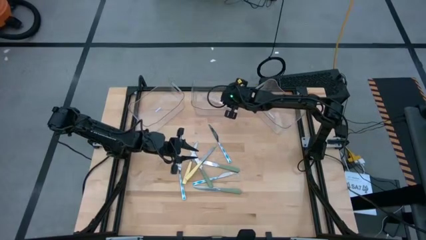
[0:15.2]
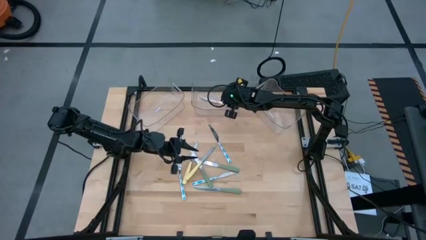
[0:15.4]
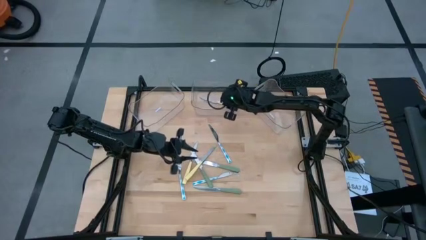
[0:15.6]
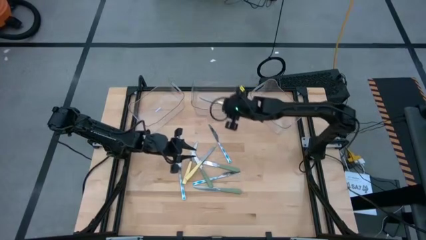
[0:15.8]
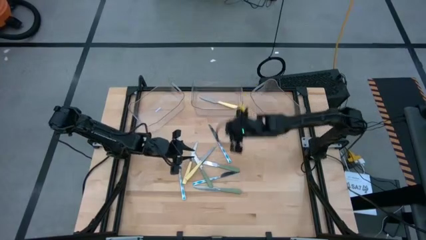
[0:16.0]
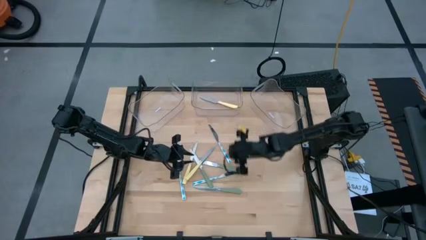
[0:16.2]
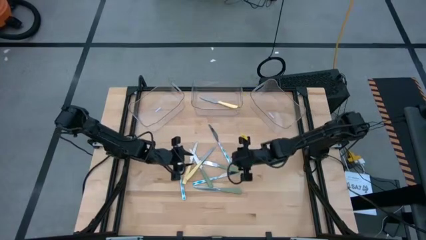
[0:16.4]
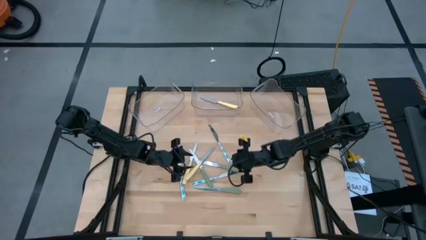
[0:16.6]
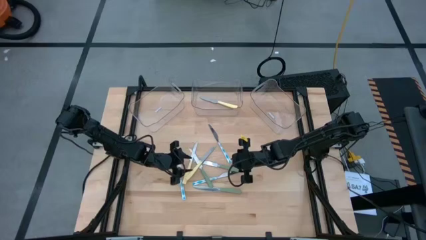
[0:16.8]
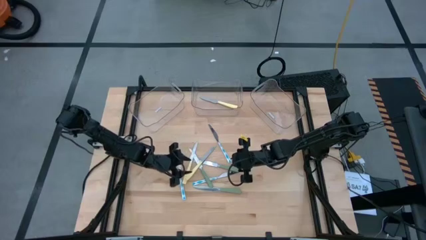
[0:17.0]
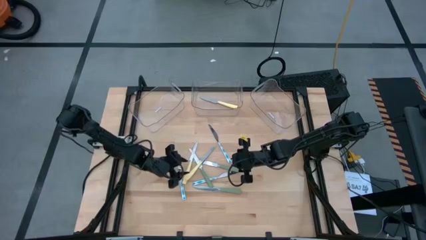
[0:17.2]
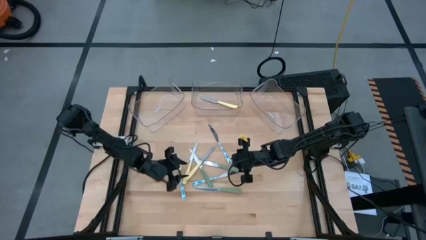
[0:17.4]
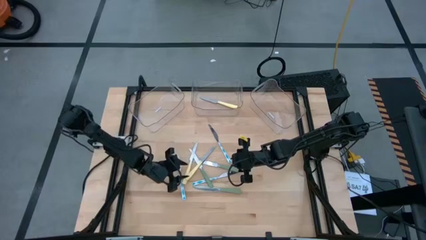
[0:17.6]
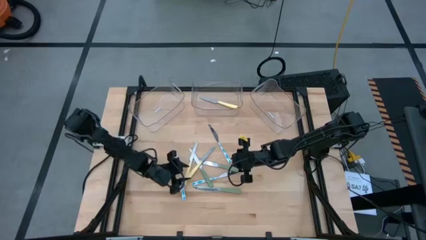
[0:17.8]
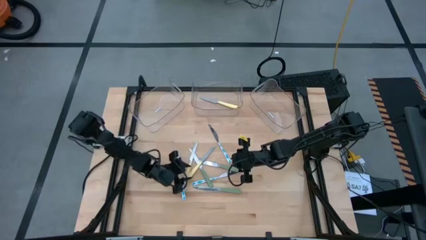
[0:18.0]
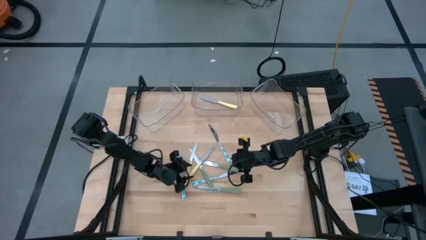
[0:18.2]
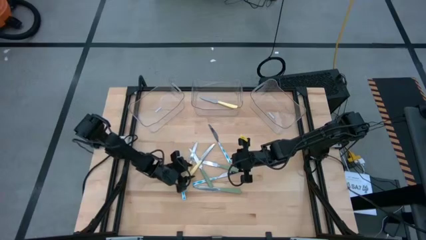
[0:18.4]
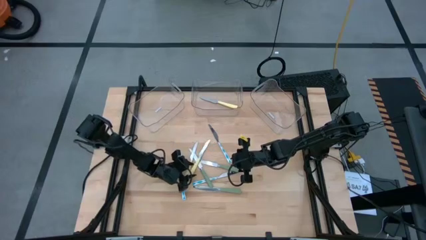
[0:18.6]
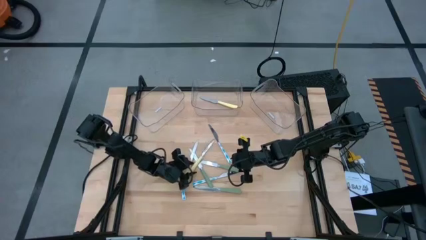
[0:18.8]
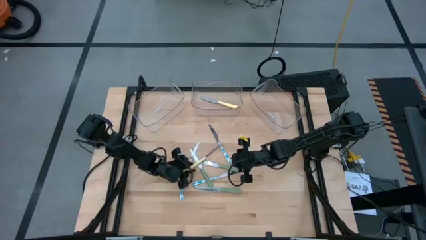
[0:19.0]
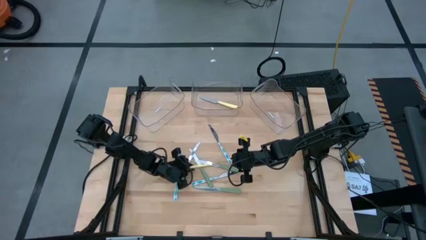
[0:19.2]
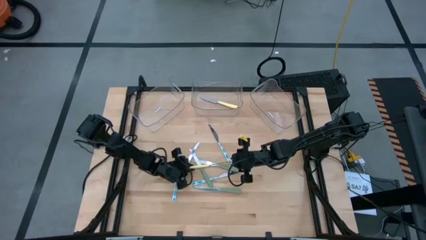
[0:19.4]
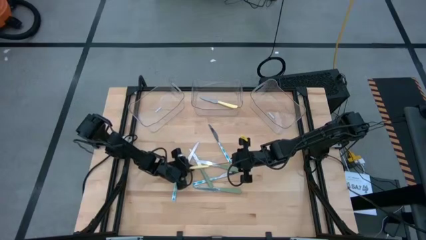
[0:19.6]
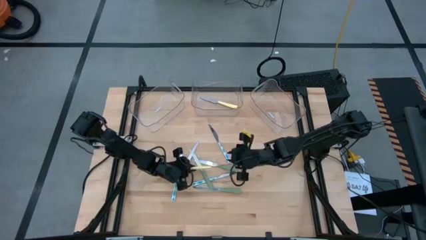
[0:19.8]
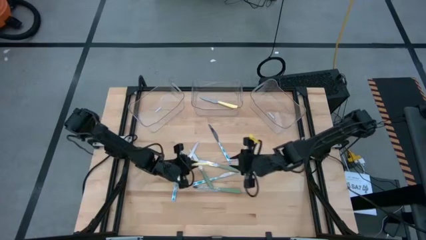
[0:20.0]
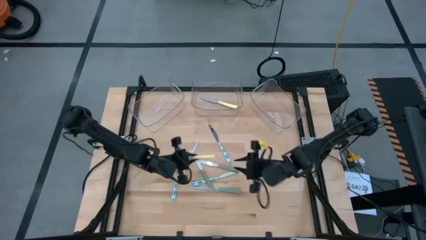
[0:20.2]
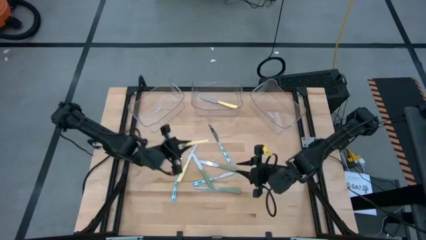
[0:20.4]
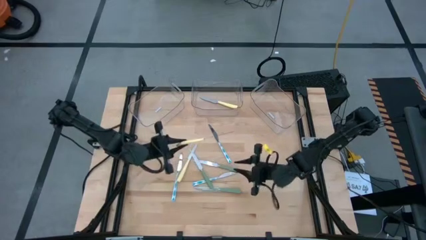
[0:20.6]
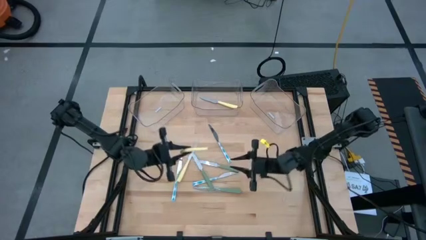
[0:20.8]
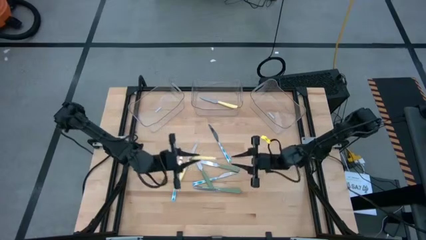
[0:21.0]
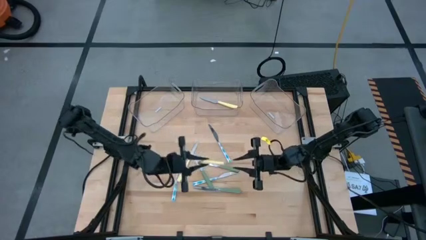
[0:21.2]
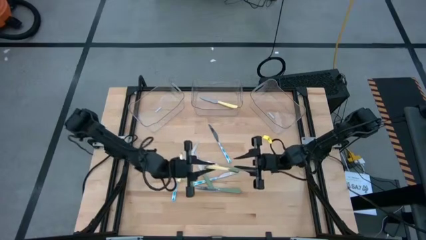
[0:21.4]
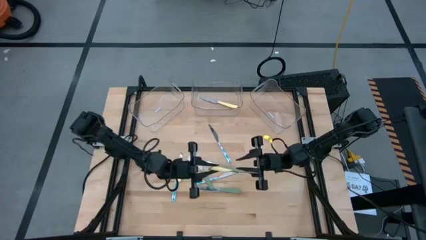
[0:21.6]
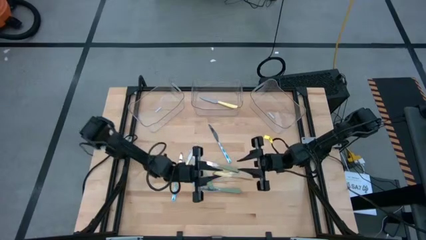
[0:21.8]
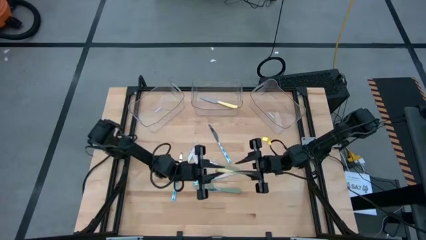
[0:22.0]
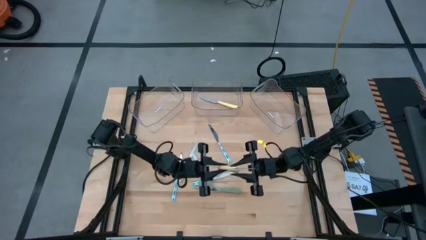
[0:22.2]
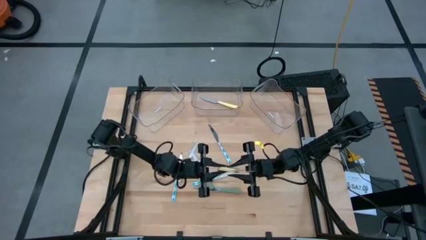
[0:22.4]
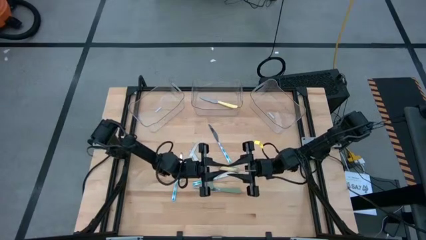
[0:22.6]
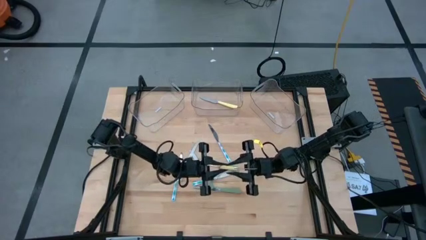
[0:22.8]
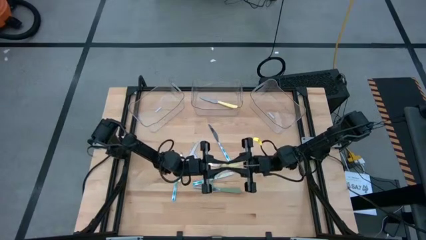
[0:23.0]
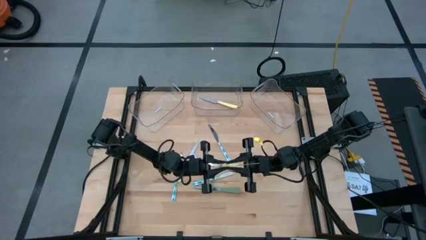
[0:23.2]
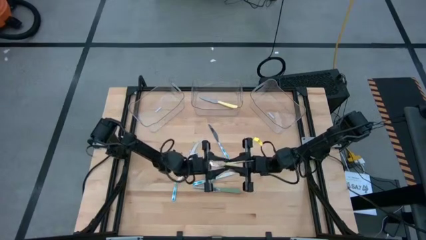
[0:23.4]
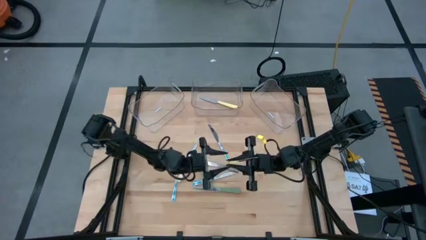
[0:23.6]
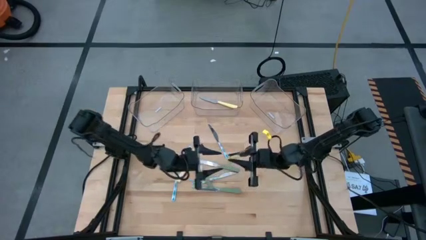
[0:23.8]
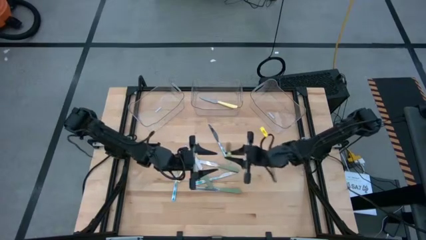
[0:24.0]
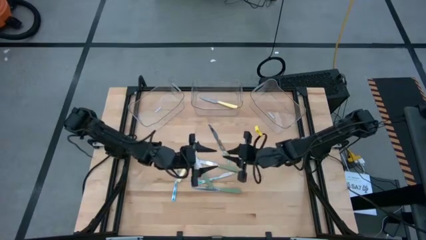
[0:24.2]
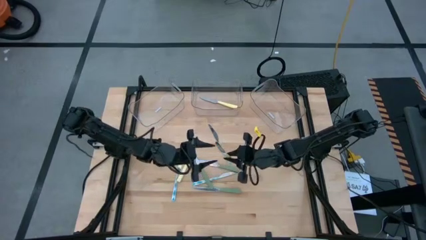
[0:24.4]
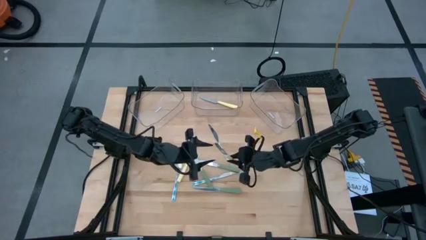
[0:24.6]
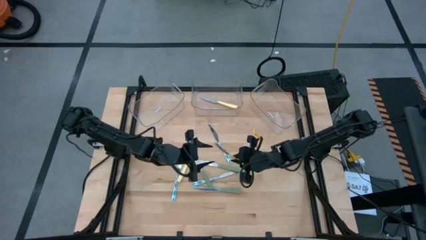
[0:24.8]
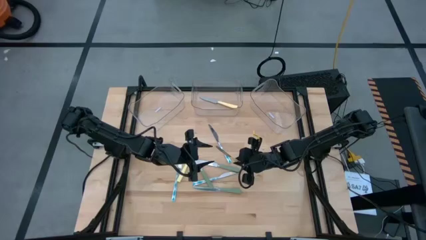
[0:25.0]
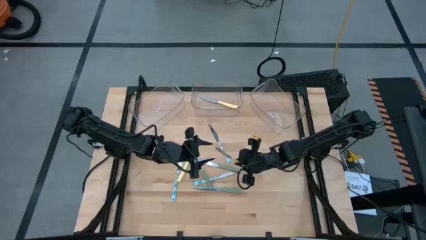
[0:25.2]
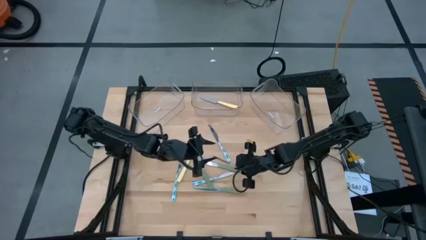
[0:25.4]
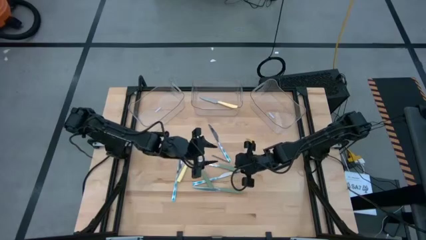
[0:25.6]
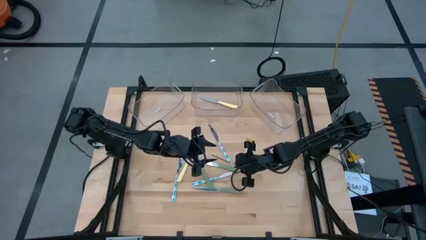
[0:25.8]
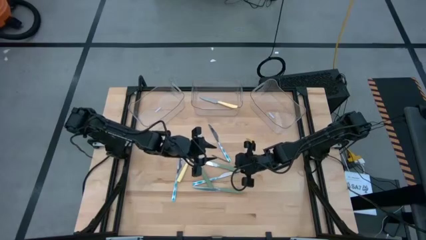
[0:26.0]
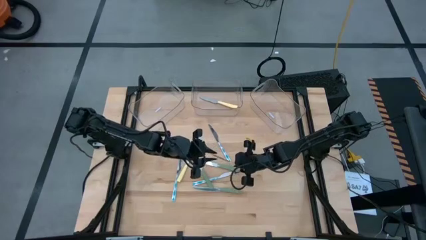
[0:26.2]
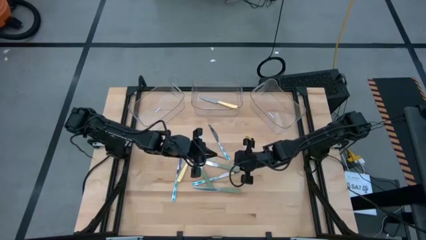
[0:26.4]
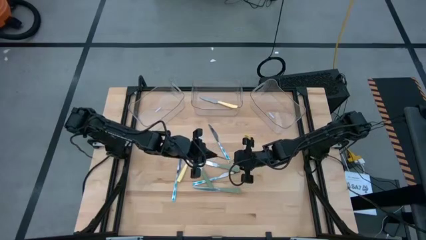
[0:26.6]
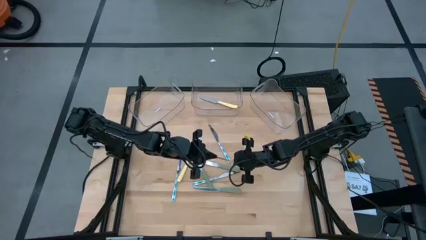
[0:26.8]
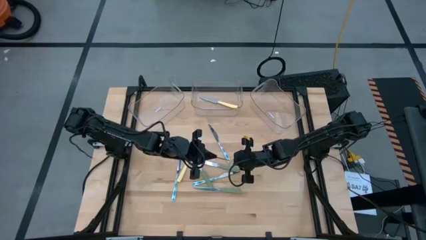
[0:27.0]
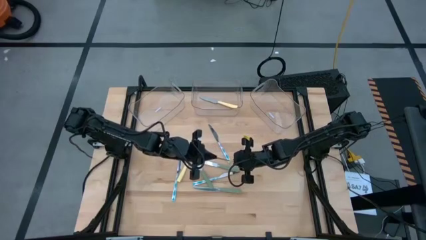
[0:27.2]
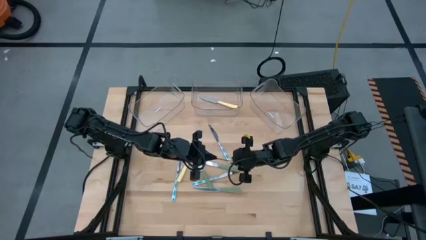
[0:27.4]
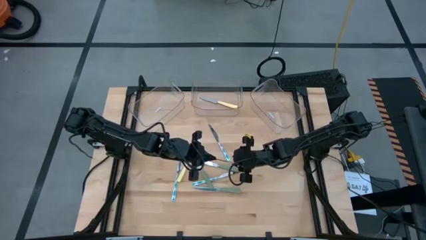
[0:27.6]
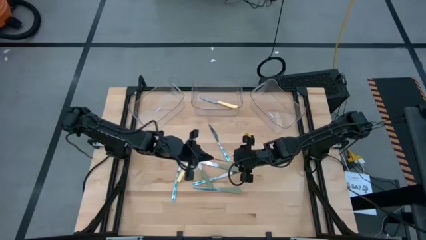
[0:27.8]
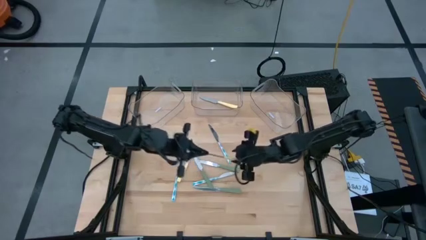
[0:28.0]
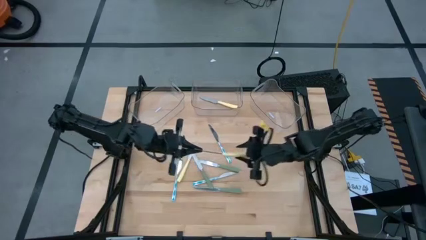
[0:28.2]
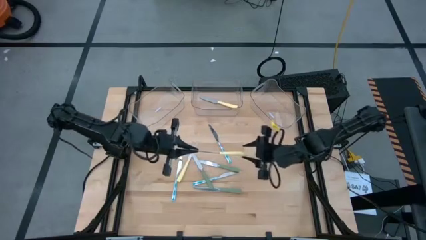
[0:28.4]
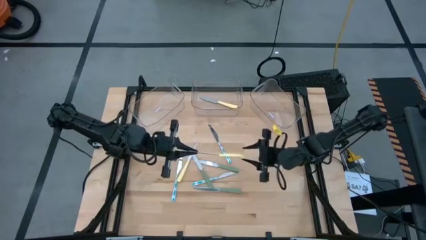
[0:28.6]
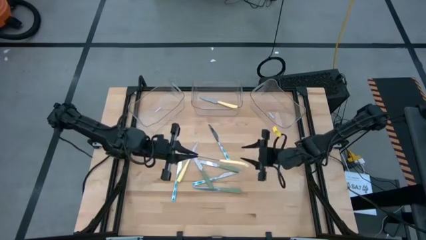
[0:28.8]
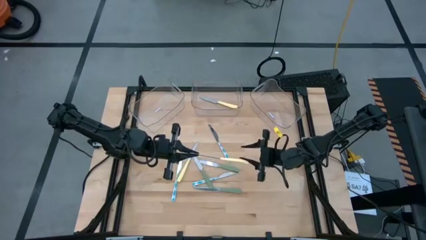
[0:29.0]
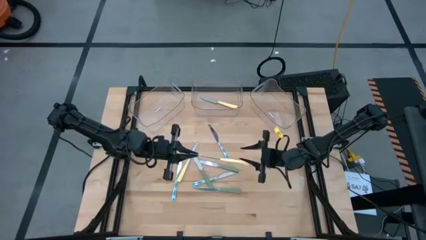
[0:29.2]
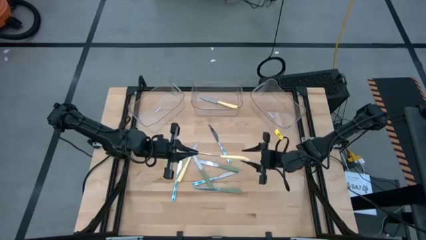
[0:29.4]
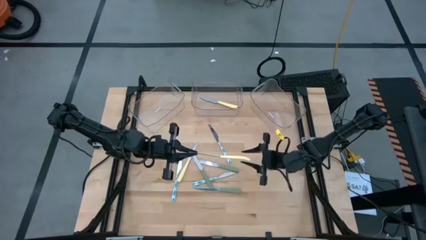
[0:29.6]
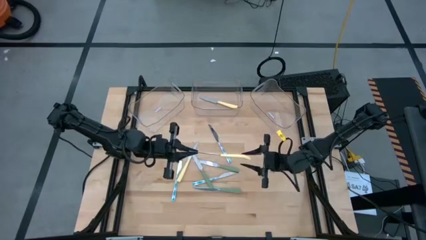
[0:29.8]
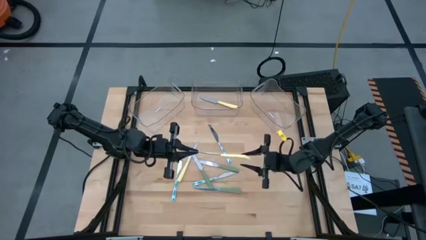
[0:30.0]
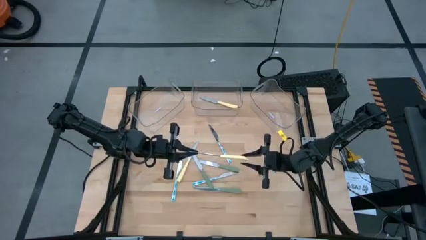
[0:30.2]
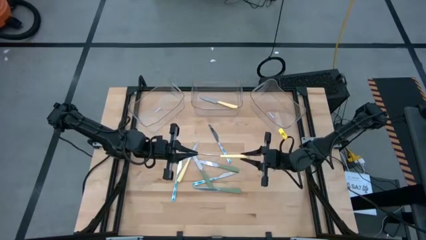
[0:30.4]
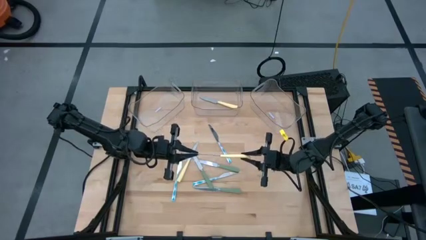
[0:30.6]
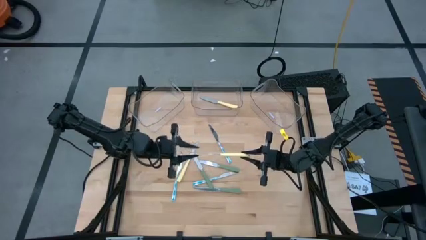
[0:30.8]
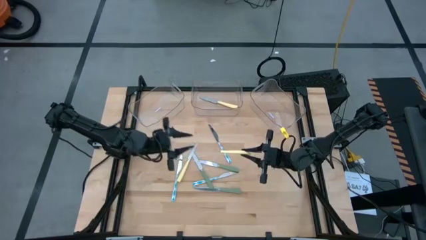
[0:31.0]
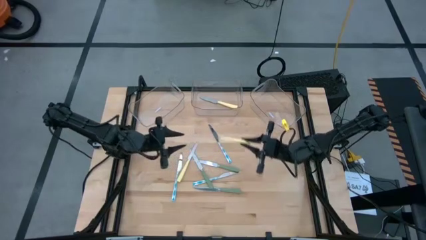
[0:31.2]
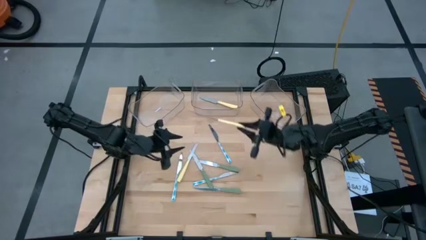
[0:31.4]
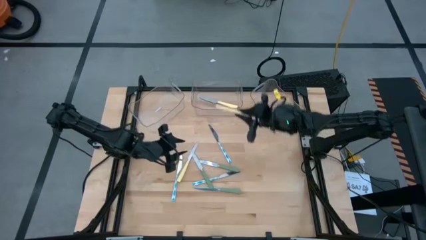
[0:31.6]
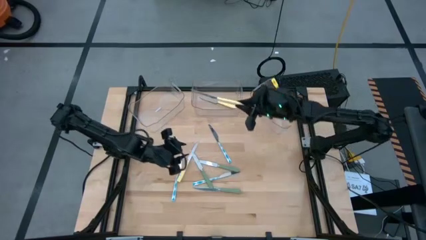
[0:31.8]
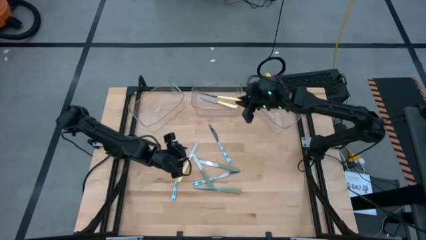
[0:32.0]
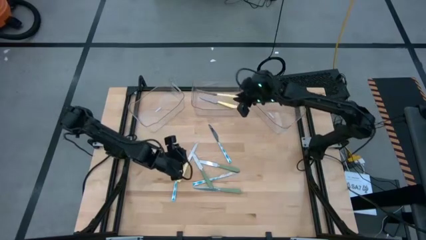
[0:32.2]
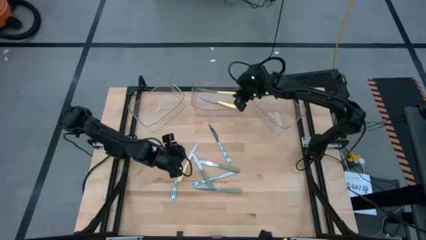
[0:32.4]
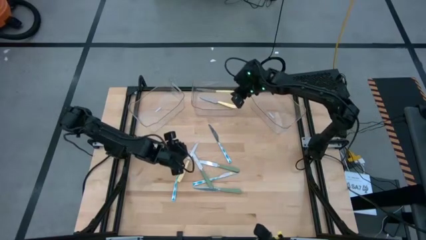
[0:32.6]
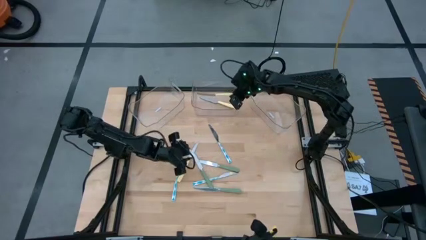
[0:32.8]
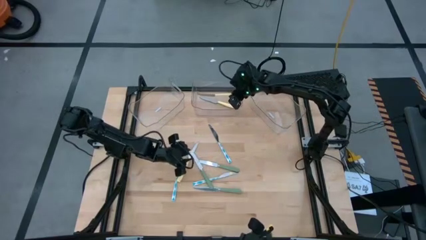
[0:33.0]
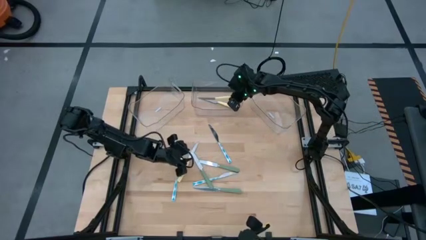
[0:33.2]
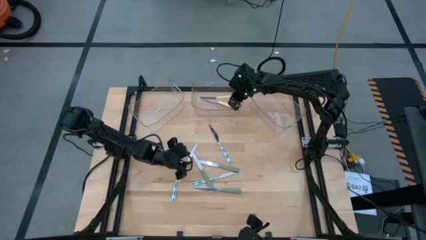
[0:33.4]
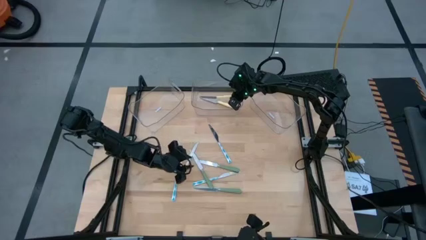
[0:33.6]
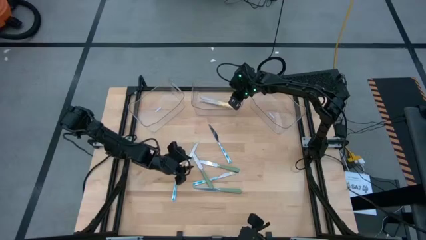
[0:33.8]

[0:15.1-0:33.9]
Task: Sort silverware by color (type)
Put the right yellow table knife into the center transparent bin
